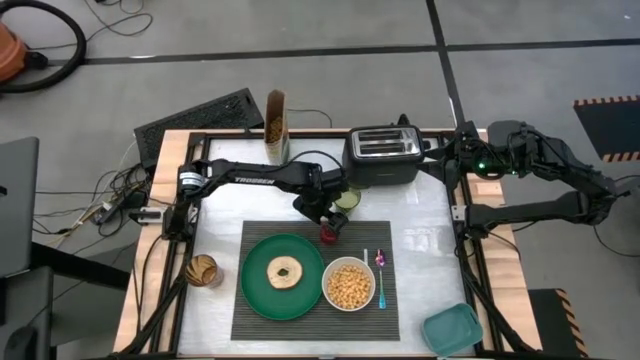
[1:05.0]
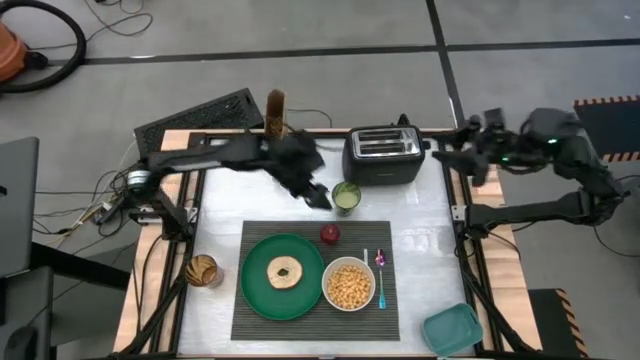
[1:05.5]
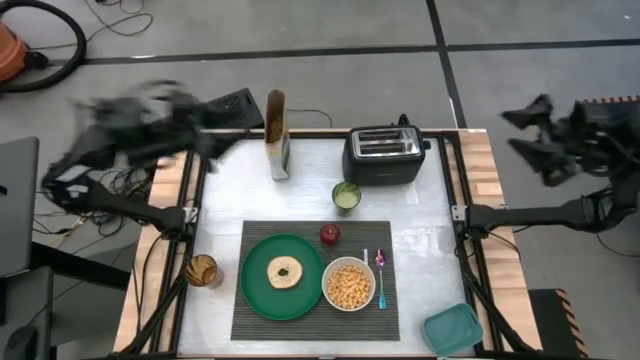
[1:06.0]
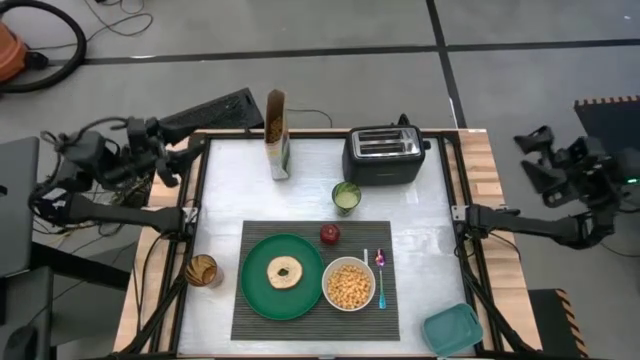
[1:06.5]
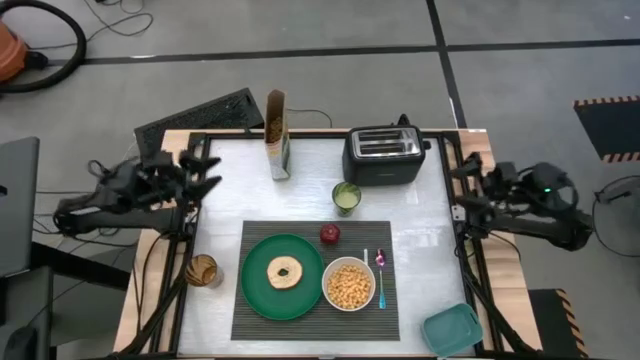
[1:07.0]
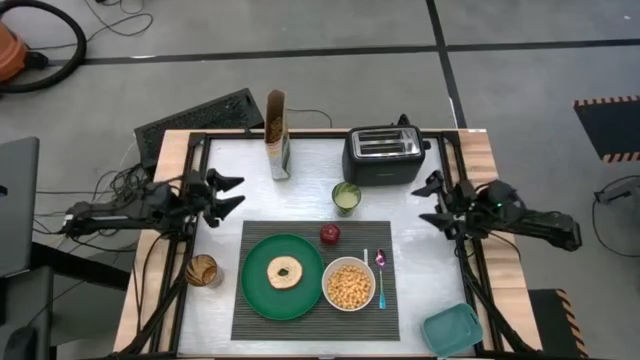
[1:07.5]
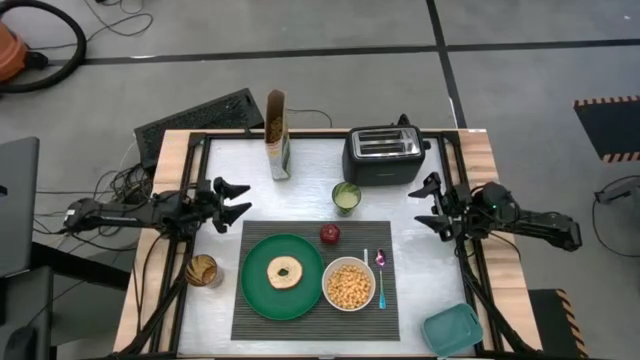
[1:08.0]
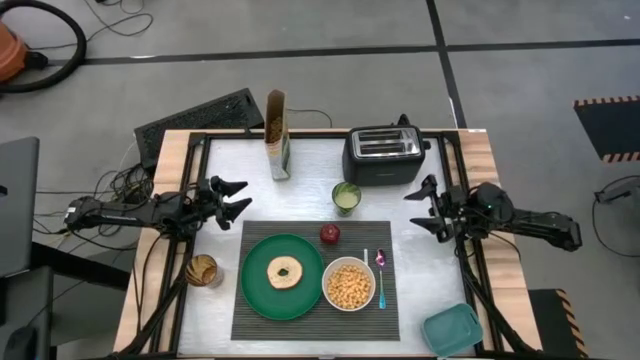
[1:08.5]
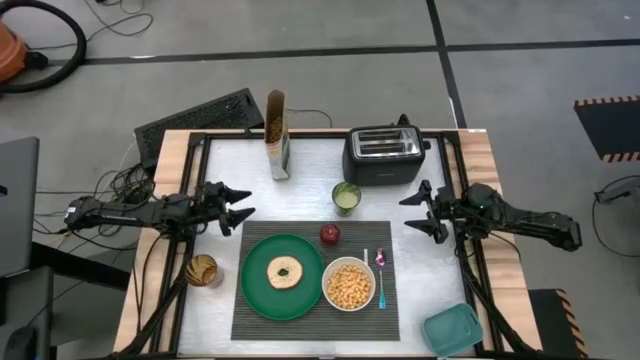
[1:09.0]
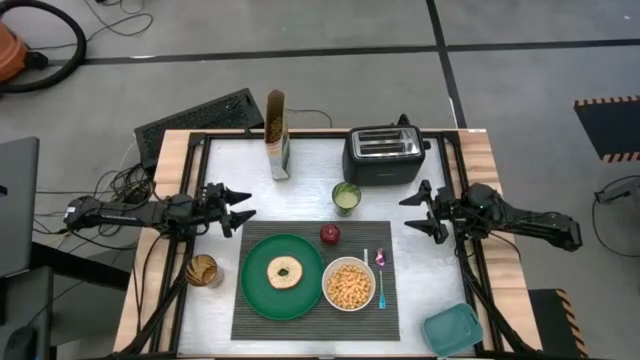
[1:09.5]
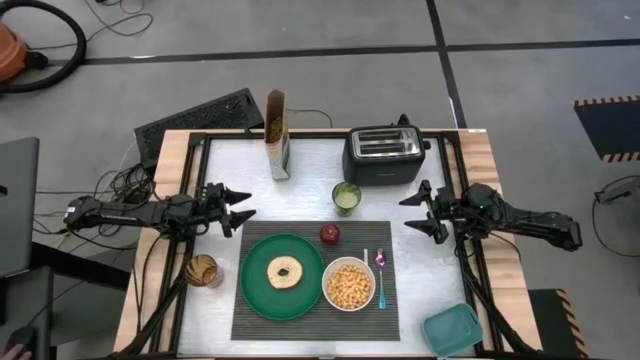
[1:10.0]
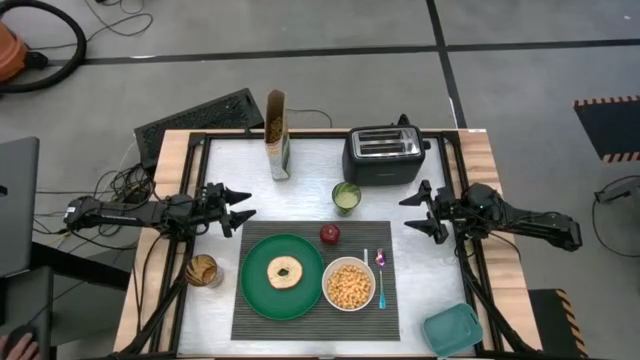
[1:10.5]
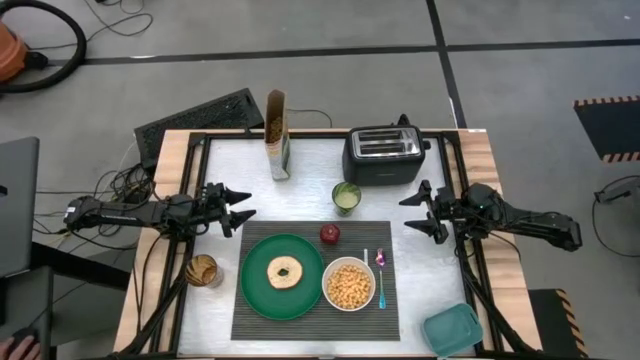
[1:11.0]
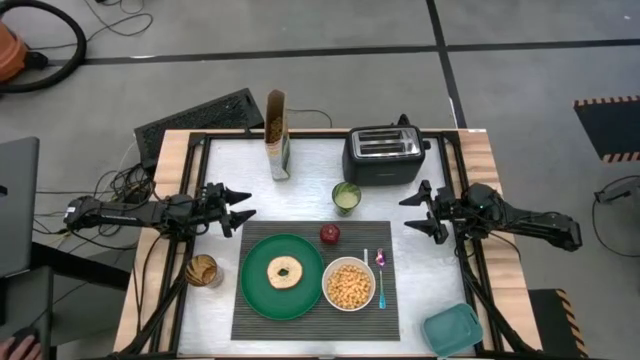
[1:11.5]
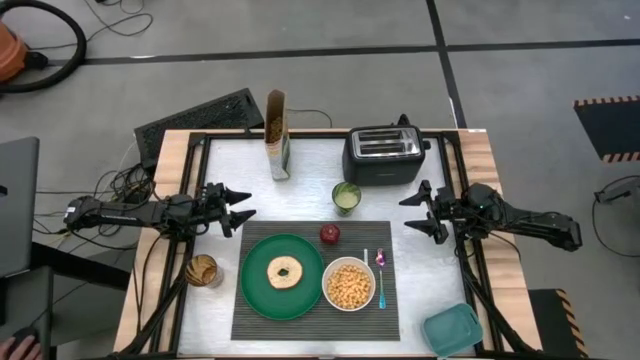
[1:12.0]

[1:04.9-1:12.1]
Task: Arrange a breakfast setting
Return to Home Position

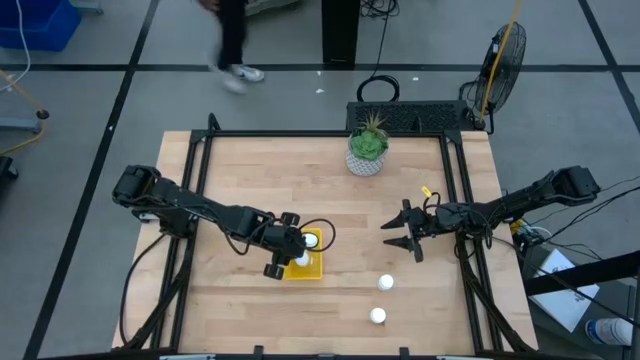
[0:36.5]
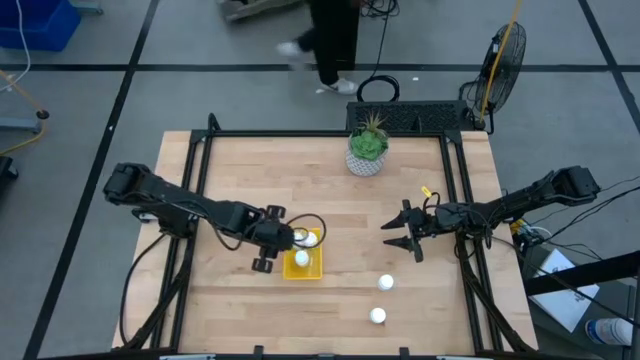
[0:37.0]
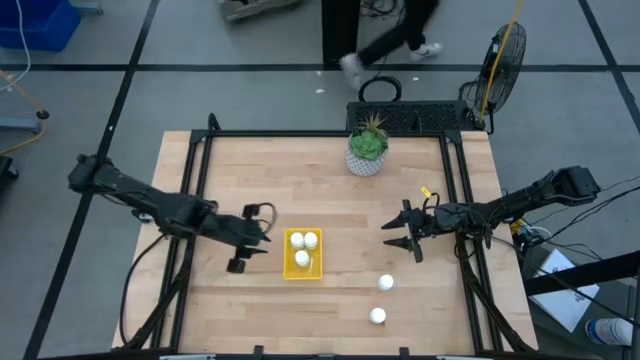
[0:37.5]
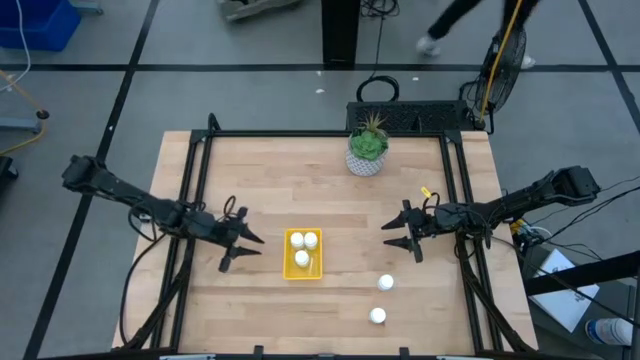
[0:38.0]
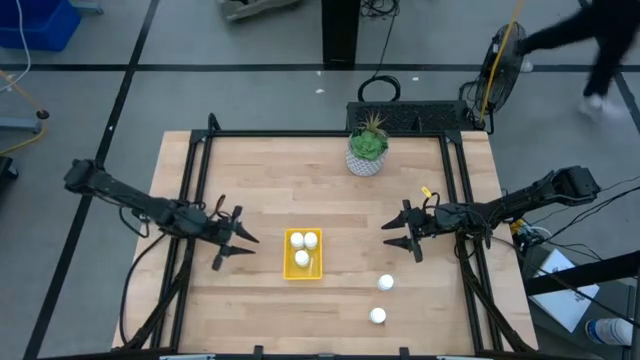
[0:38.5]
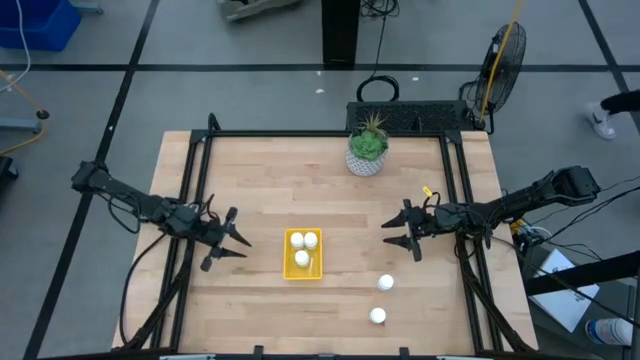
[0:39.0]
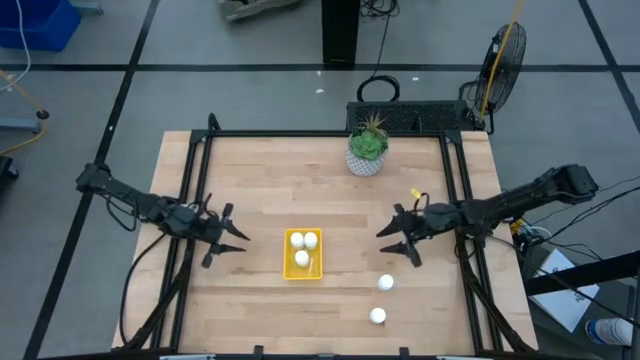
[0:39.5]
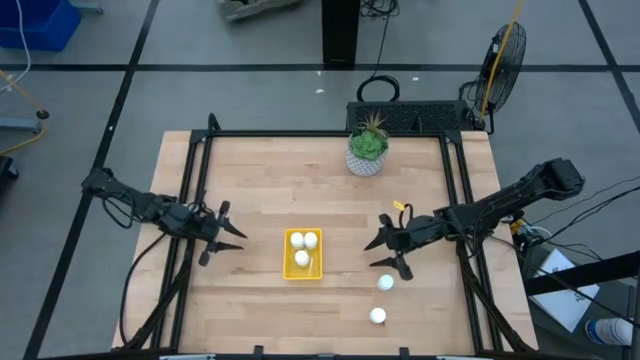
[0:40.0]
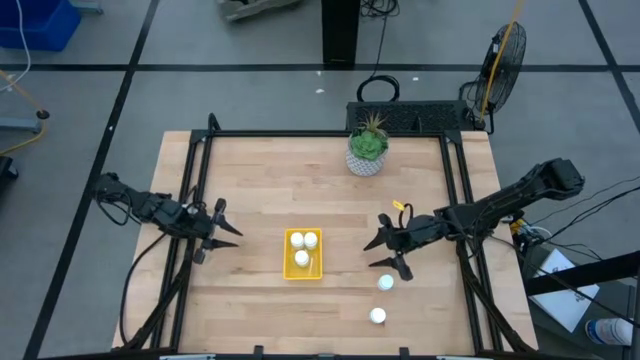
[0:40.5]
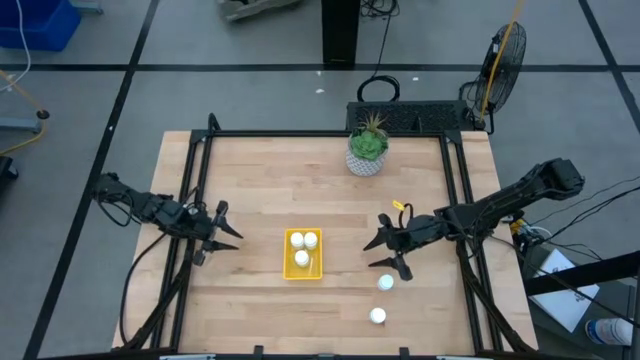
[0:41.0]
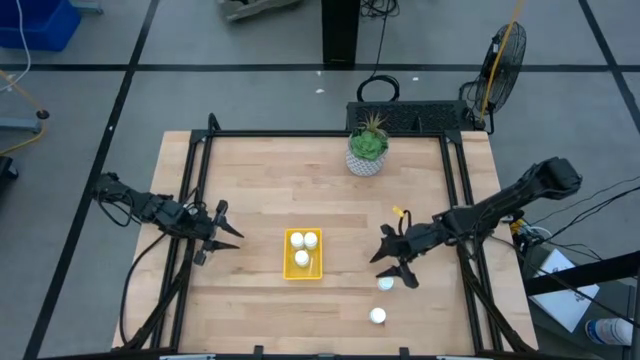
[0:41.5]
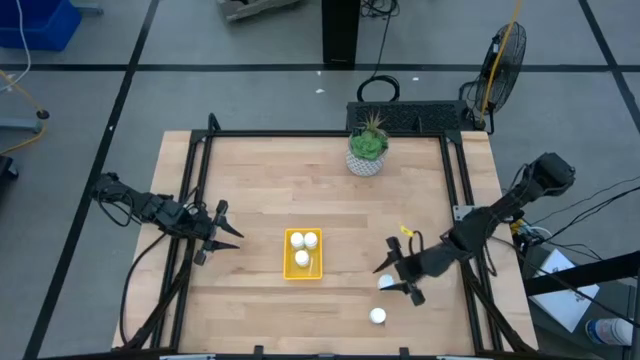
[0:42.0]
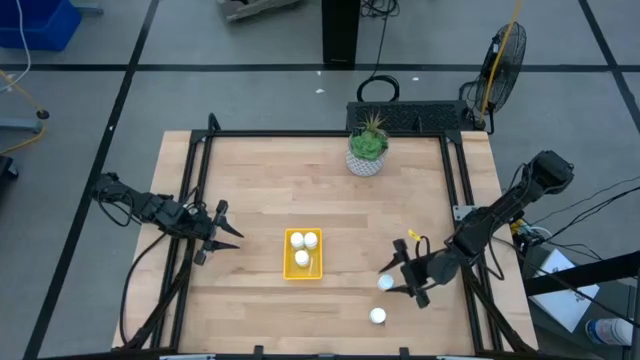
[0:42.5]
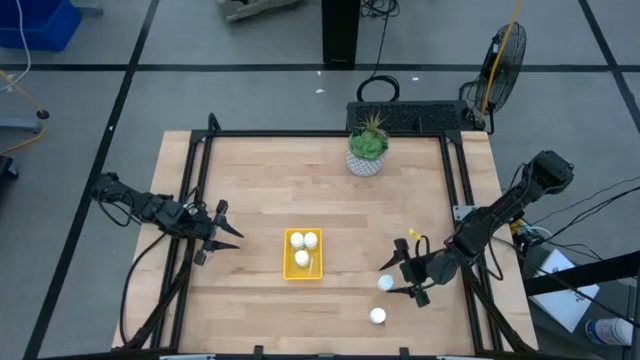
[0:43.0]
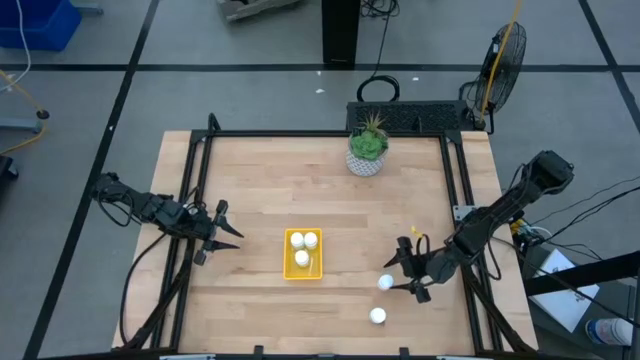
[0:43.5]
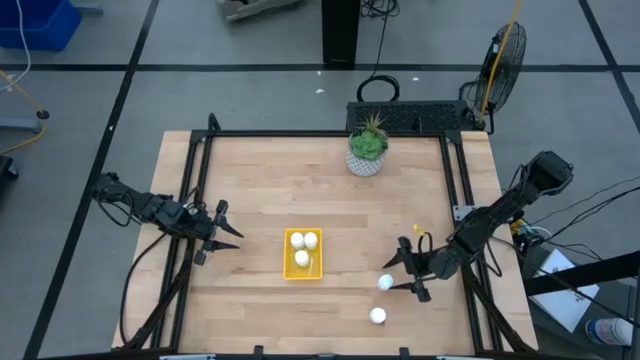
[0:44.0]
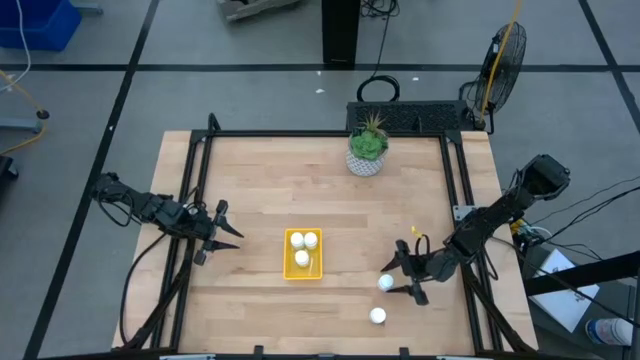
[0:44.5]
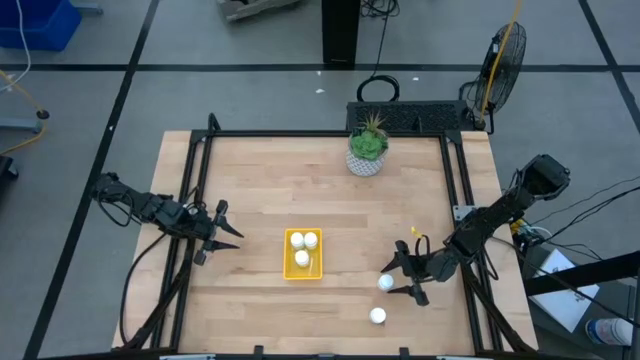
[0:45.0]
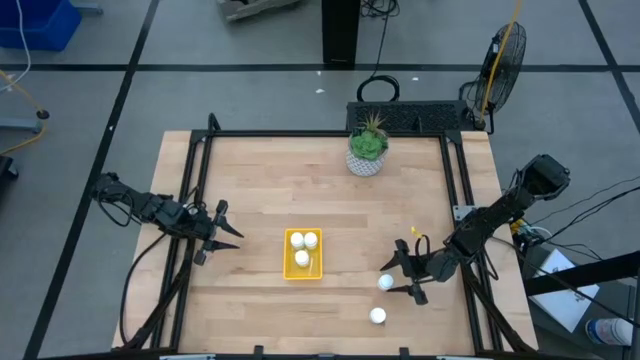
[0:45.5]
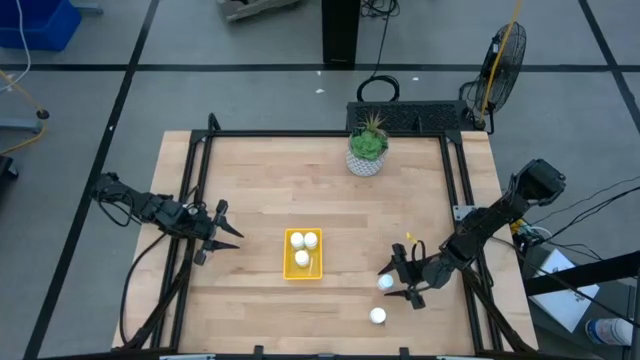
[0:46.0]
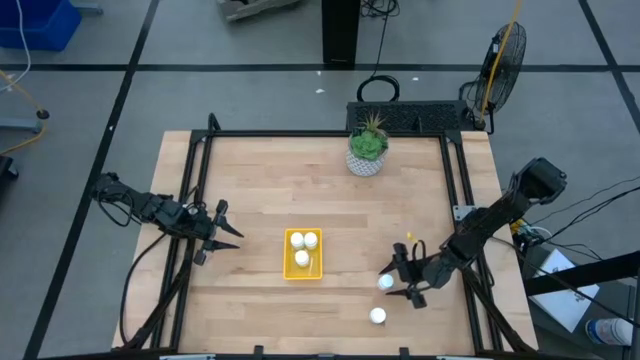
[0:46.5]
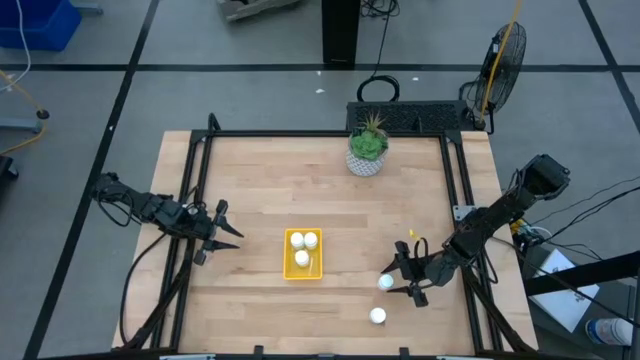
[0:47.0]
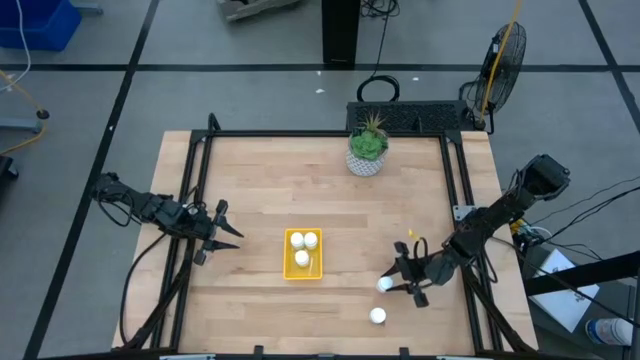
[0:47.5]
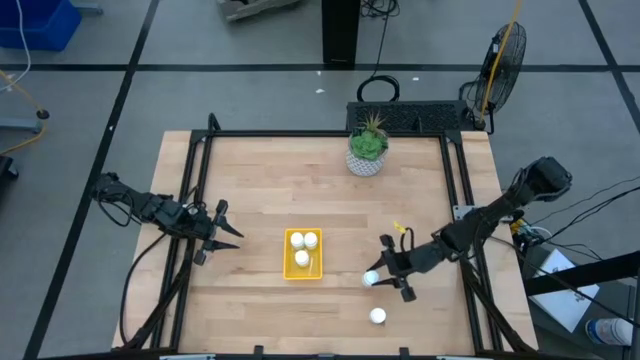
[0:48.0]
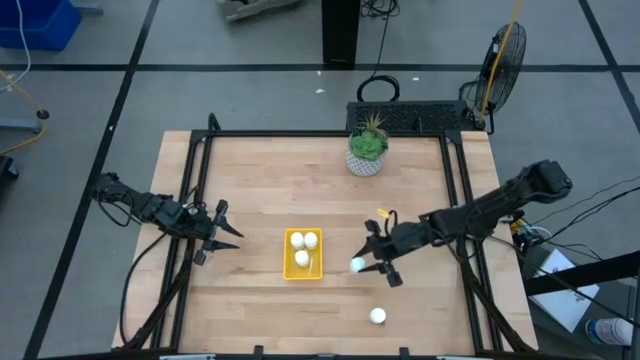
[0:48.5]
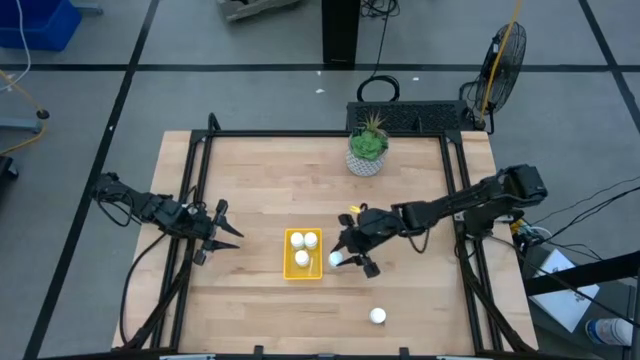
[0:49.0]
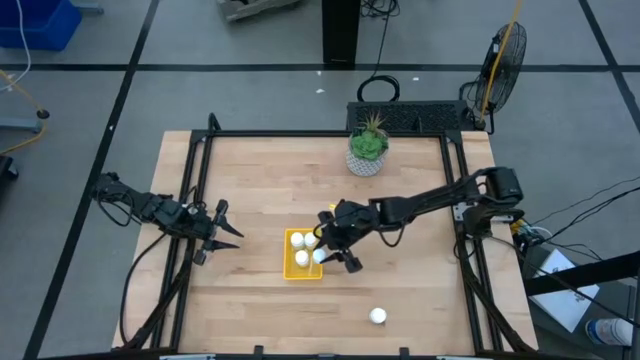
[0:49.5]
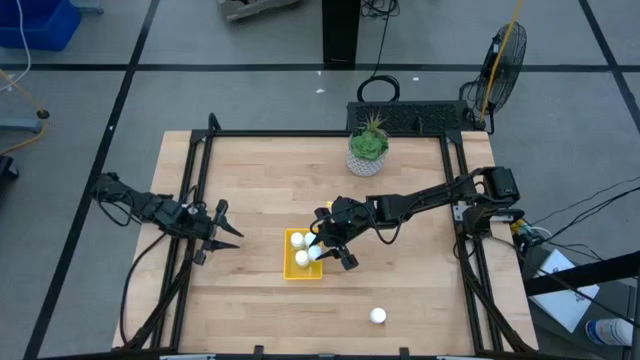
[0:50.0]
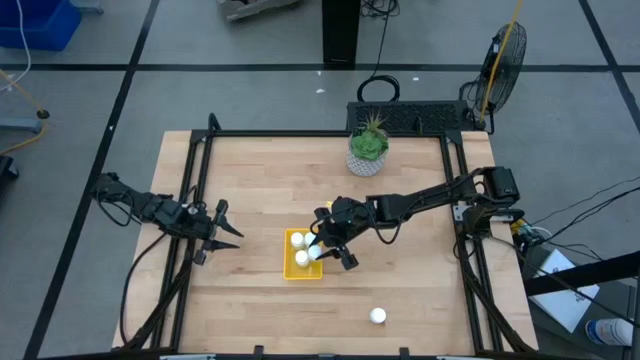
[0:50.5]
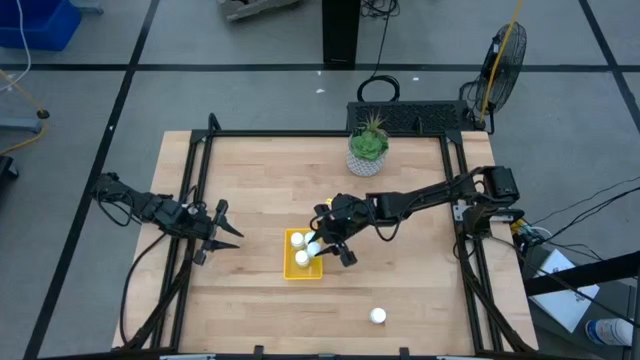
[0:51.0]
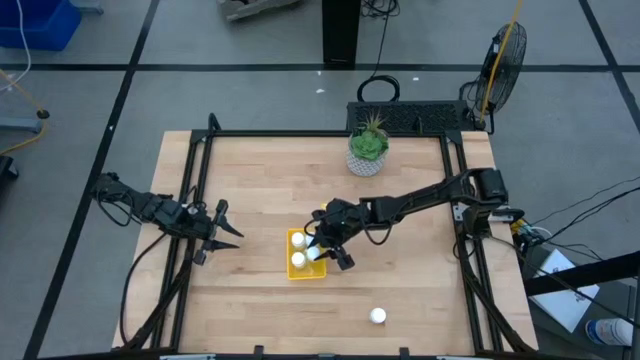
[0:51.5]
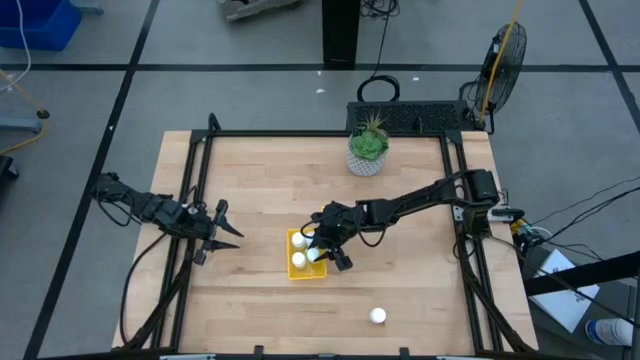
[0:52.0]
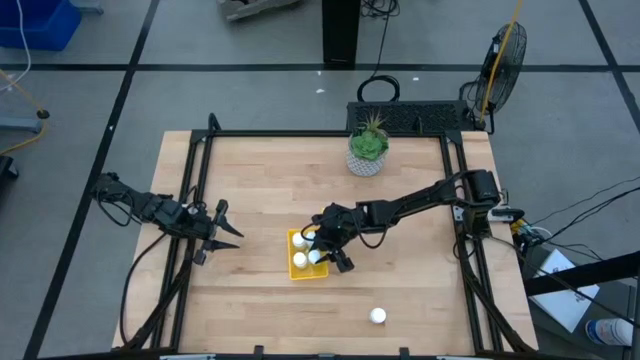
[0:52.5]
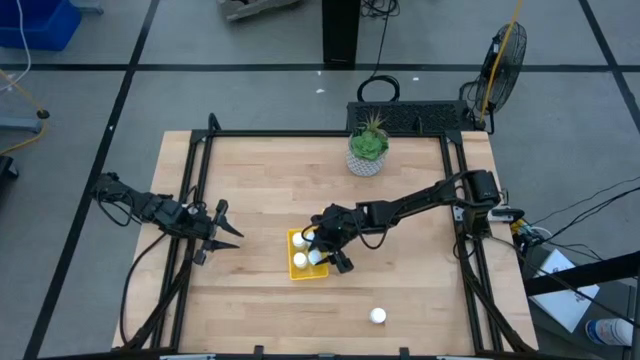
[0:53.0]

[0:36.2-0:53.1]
Task: Pick and place pill bottles into a basket
Put the white pill bottle into the yellow basket
